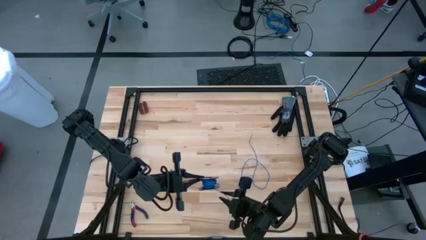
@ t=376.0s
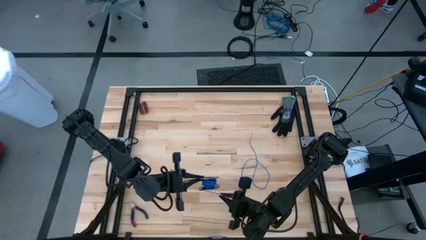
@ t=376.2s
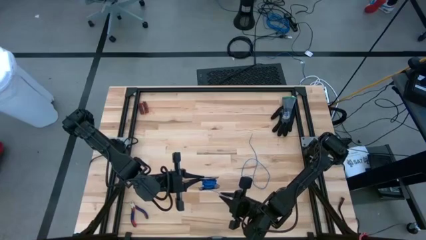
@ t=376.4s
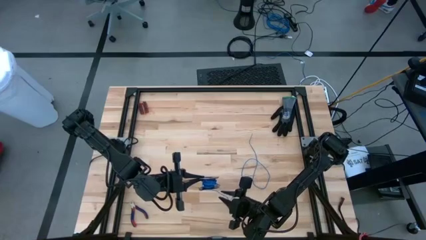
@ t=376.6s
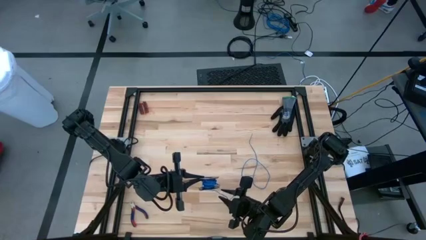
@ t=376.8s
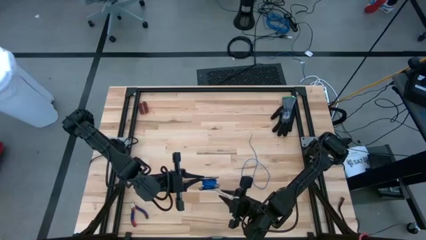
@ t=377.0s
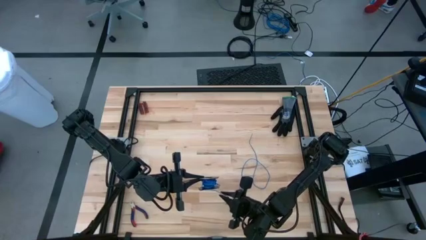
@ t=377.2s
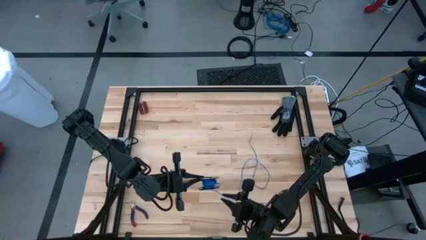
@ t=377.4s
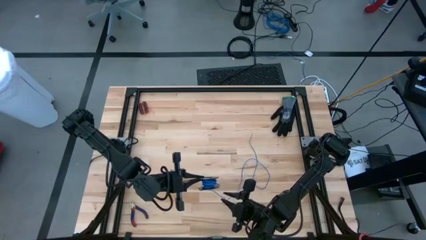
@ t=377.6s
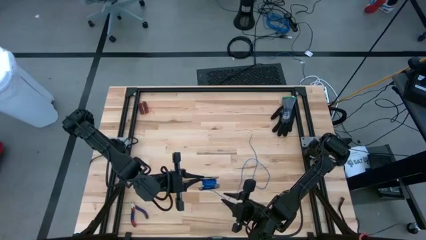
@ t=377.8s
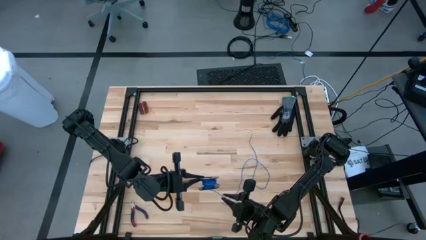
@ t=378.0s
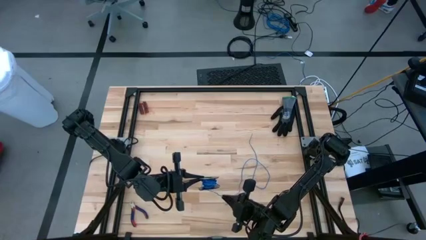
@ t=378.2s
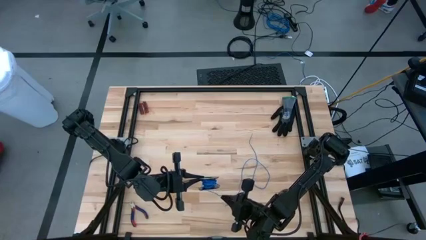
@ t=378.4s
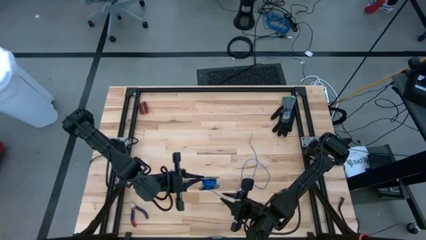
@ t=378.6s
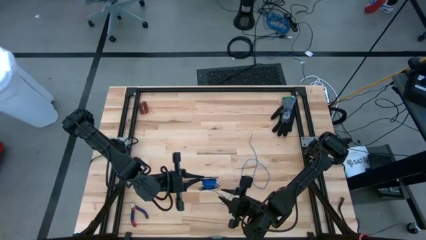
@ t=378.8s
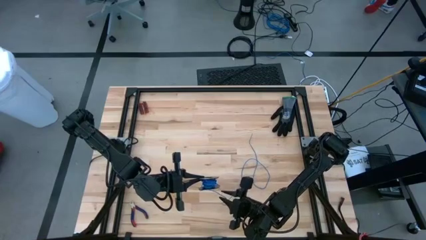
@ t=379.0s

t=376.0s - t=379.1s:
Task: Coil cords
Coil the green wire onto a spool

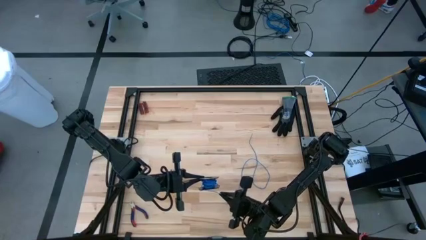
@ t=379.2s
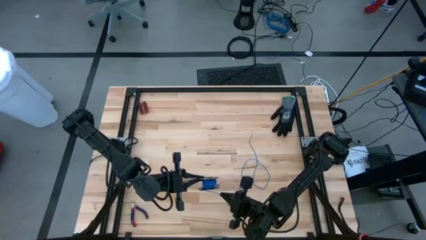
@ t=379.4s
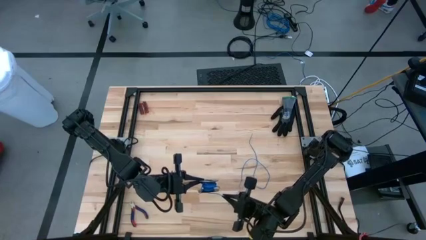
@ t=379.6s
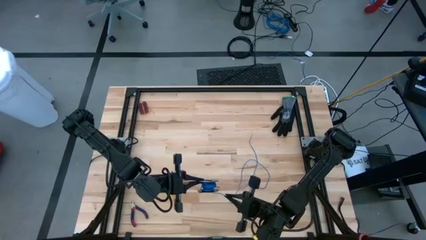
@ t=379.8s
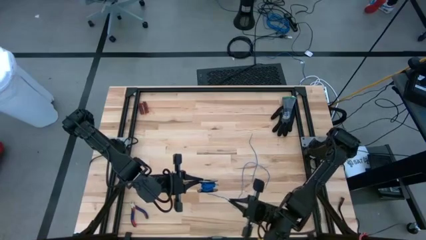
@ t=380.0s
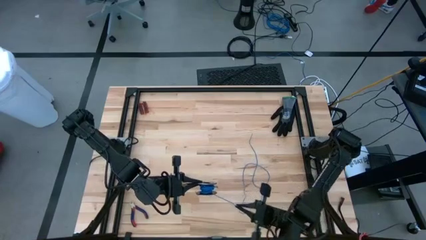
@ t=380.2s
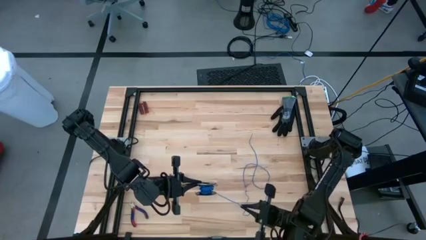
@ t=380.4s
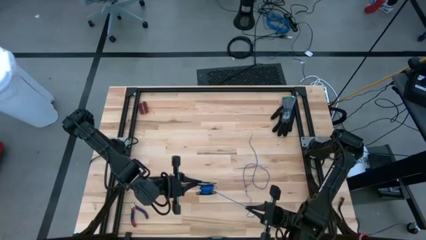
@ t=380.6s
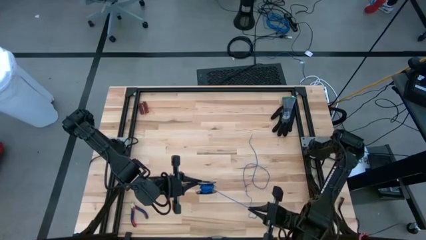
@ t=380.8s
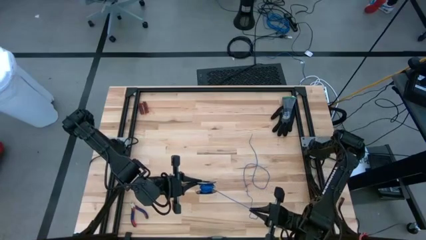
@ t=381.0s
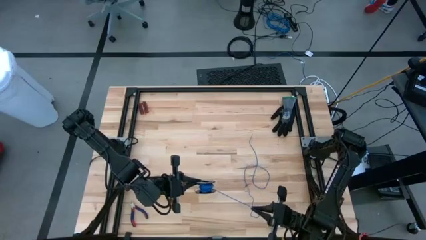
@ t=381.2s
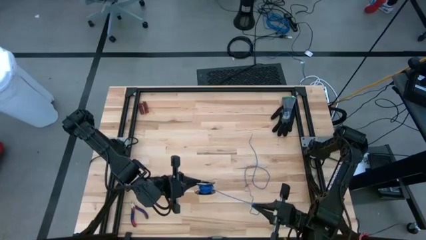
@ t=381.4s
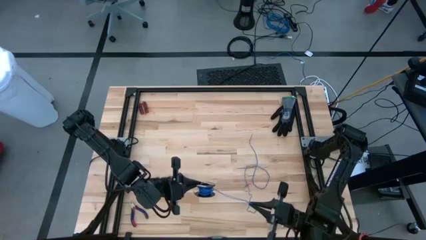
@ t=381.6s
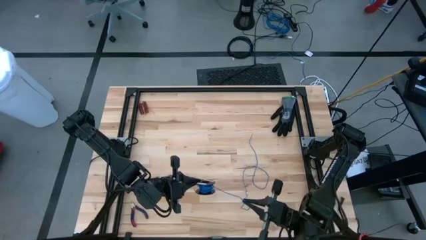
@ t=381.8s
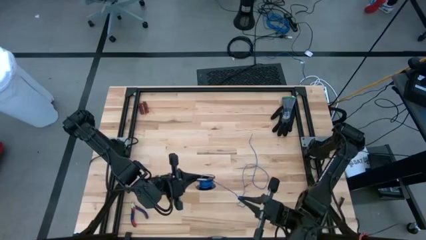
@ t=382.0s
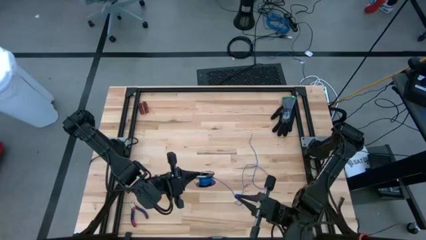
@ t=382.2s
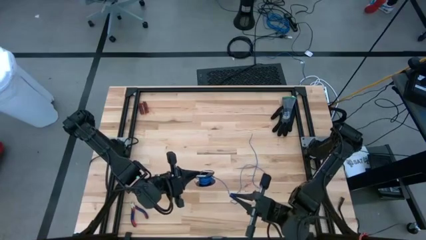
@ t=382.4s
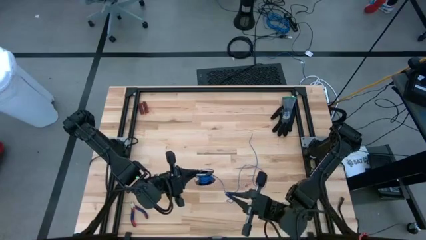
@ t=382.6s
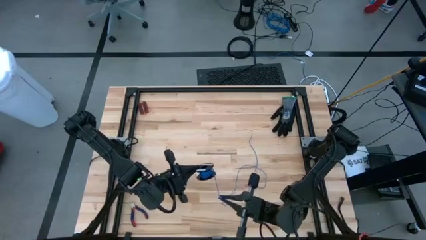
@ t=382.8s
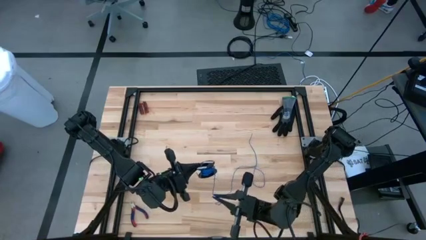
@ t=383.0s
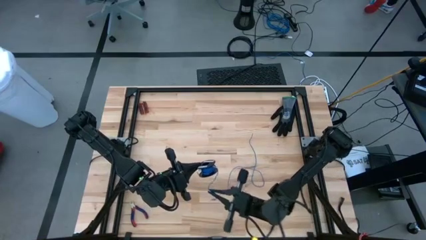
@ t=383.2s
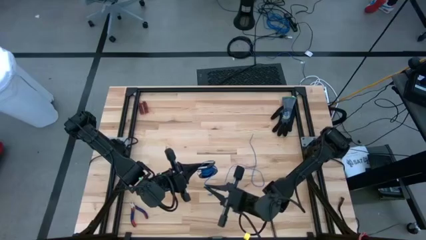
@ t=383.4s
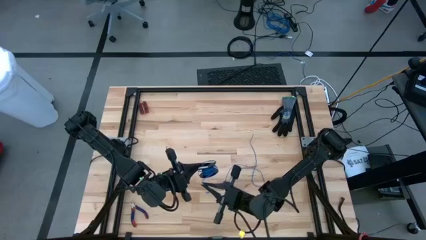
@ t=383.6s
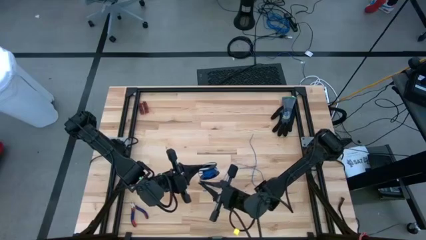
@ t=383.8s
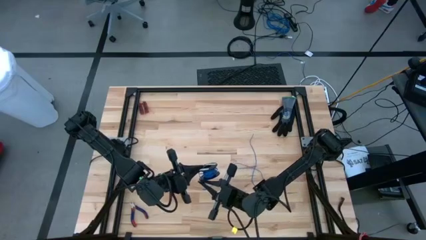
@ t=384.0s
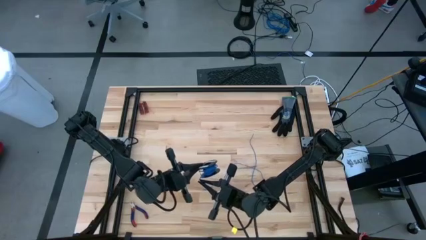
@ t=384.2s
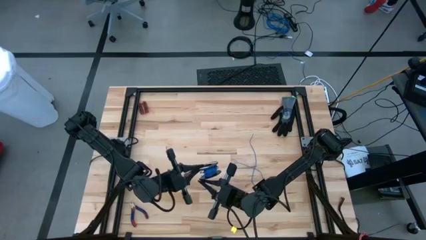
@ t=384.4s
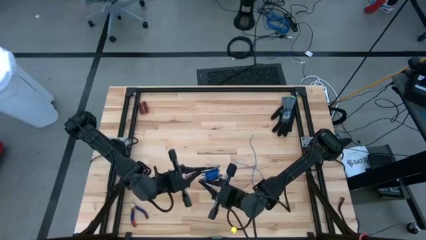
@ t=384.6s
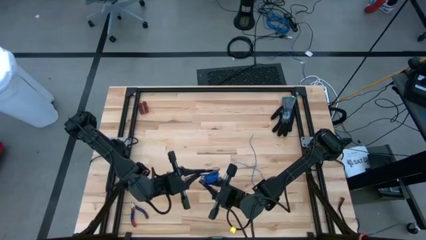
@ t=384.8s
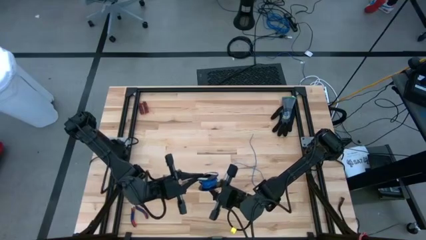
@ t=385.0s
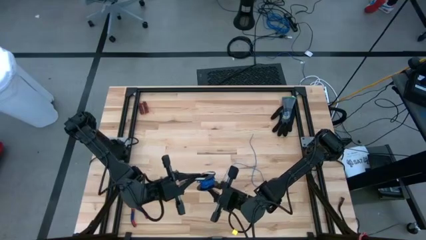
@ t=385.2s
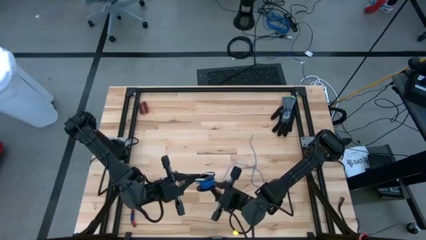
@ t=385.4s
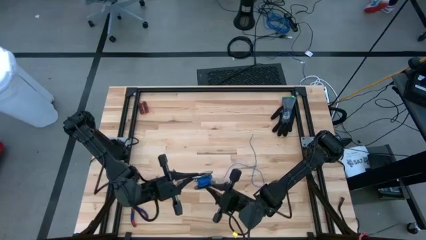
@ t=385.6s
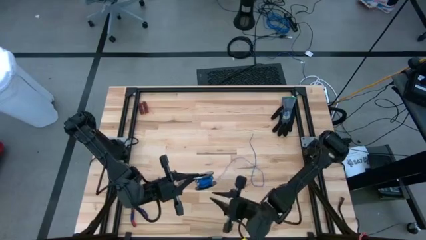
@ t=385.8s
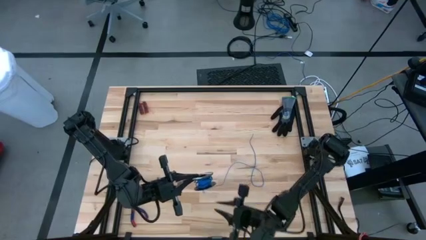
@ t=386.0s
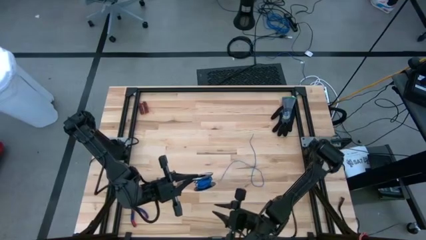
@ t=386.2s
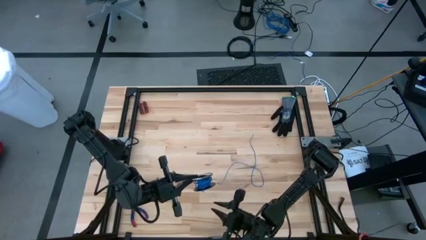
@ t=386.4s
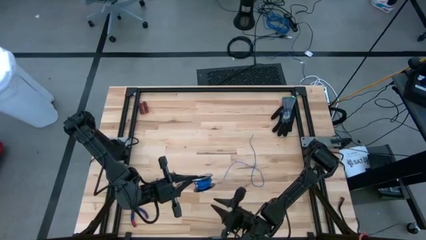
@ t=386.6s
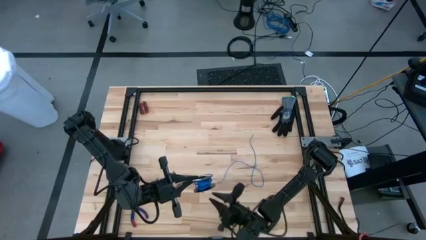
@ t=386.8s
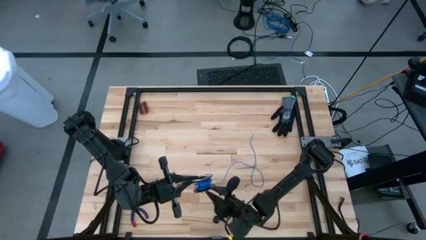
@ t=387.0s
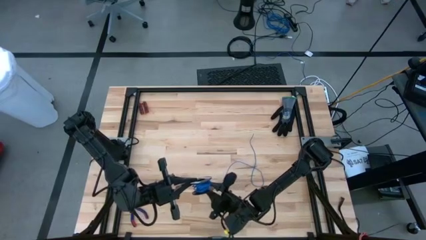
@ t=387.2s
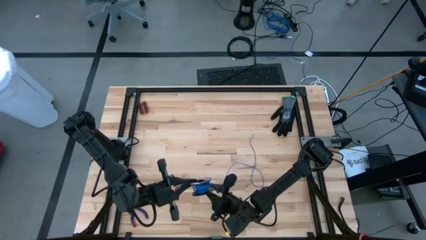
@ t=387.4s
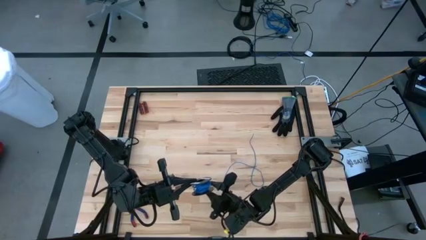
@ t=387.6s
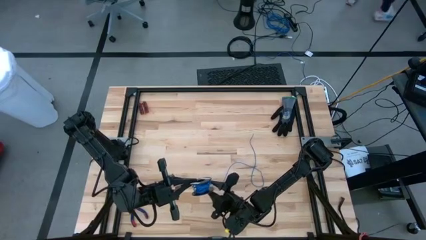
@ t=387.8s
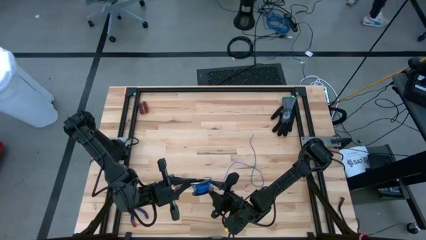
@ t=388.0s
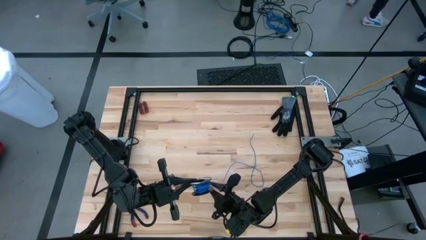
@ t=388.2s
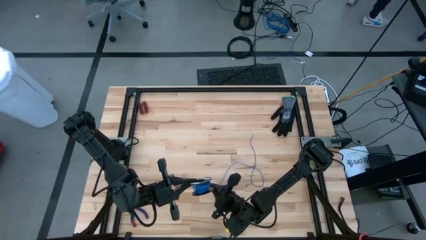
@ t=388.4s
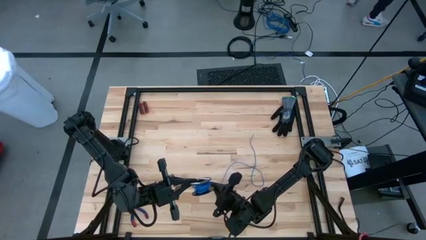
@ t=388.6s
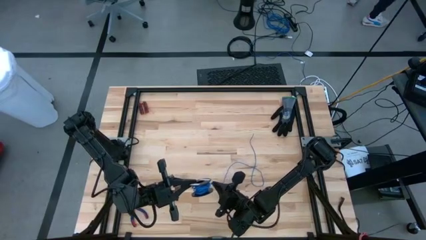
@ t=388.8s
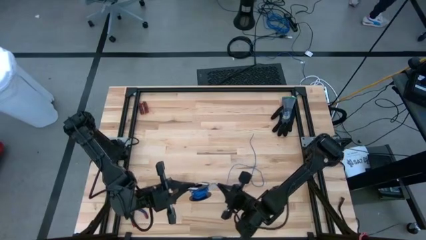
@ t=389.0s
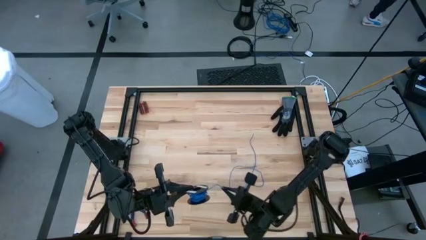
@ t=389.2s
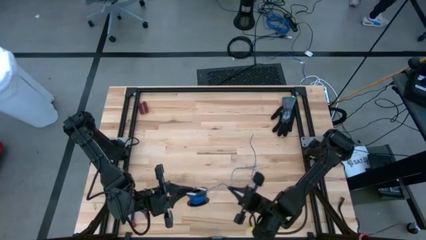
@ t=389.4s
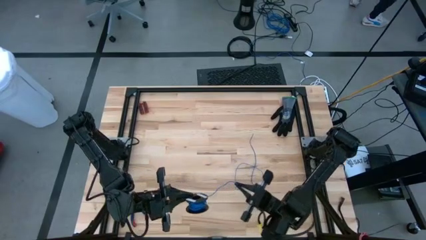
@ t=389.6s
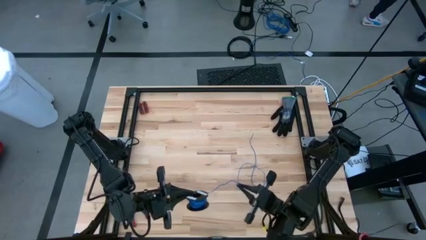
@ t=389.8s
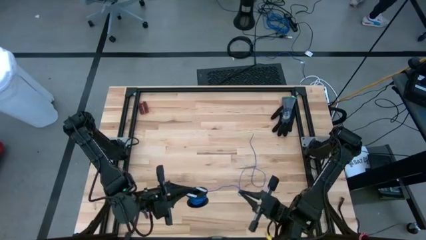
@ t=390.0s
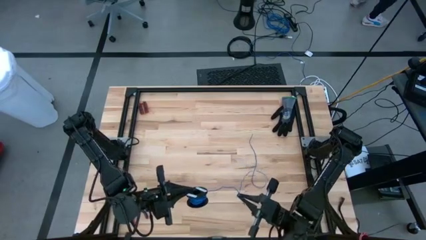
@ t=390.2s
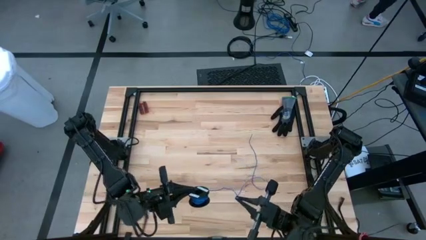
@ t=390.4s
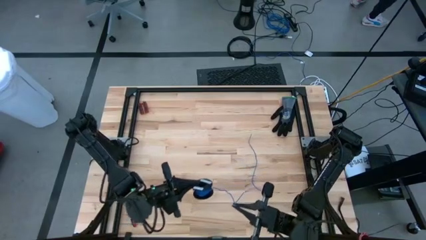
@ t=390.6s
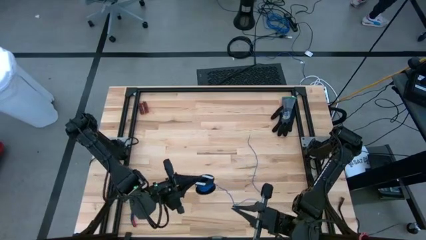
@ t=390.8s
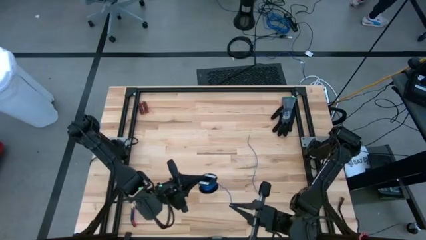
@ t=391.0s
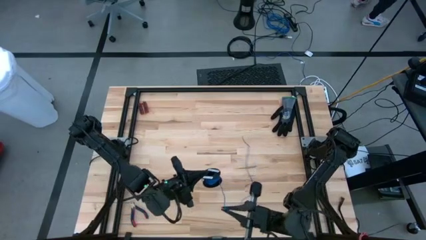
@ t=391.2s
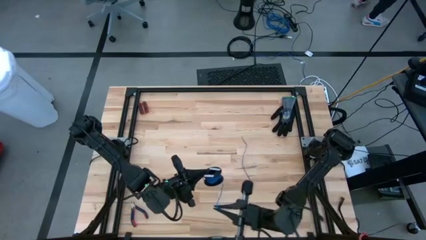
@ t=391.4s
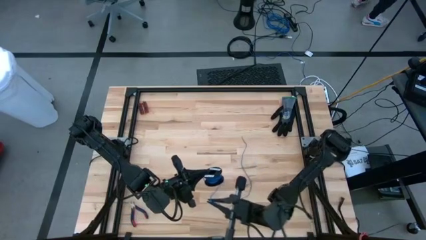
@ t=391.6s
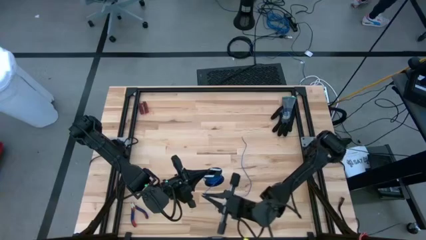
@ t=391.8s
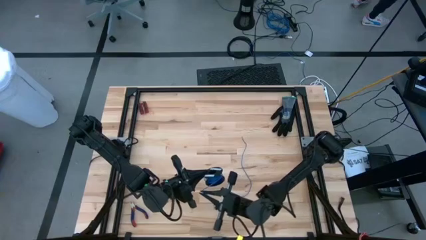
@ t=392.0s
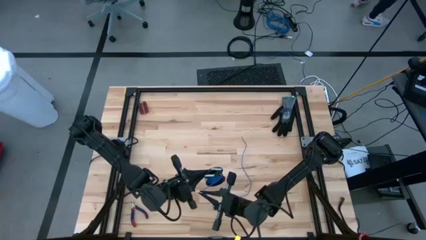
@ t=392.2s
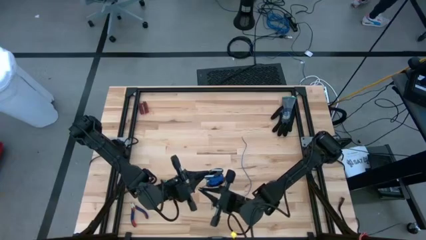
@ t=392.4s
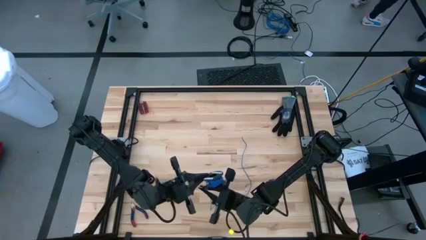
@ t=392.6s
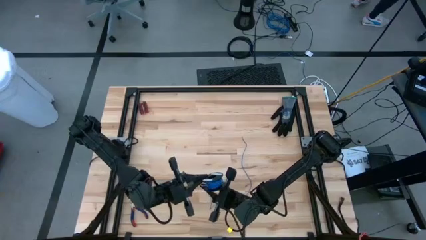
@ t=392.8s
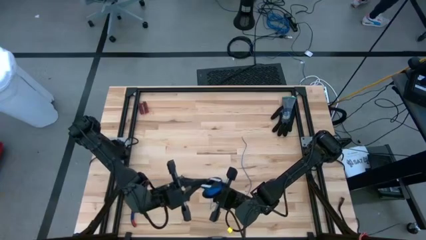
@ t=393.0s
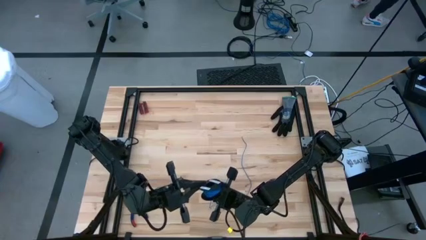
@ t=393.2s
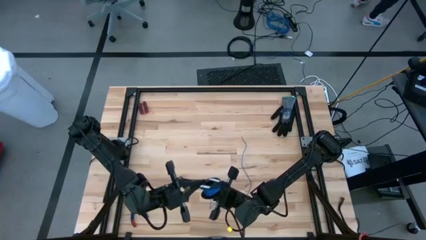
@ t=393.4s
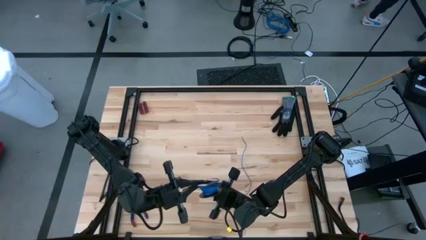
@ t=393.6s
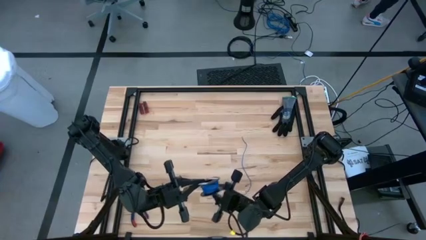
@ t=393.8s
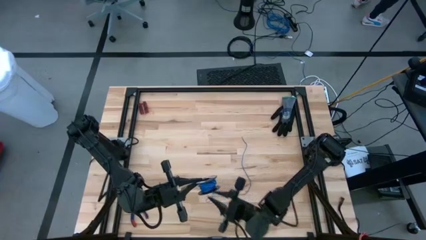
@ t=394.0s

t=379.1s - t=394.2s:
Coil the blue wire onto a spool
